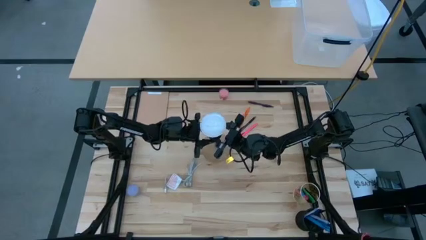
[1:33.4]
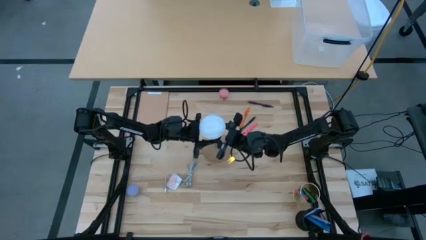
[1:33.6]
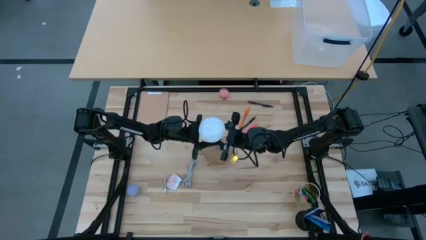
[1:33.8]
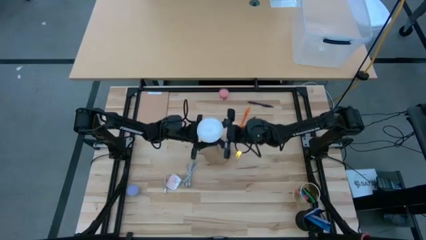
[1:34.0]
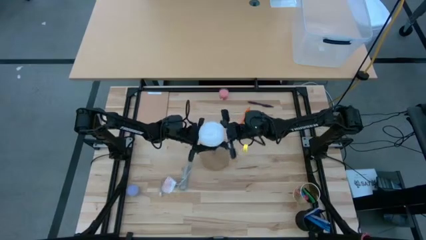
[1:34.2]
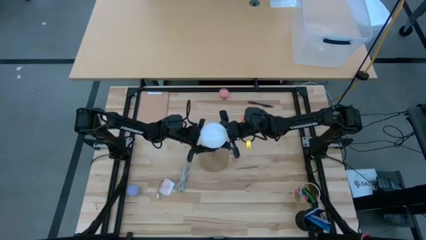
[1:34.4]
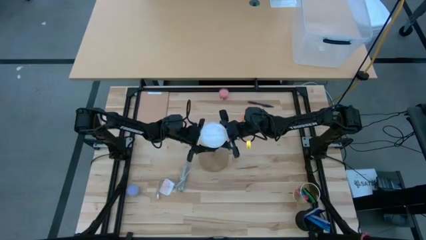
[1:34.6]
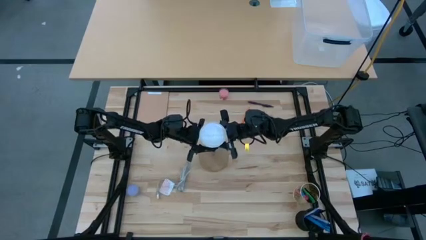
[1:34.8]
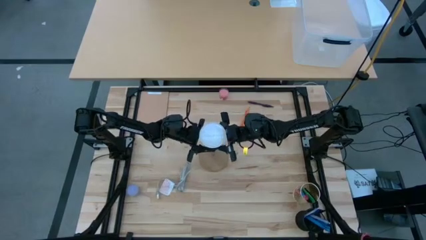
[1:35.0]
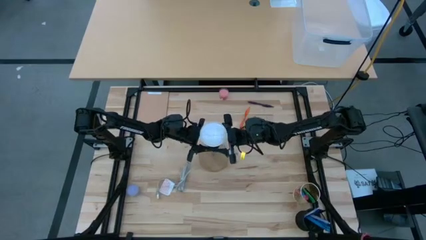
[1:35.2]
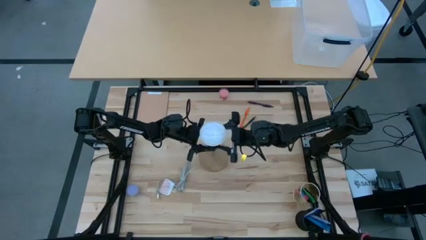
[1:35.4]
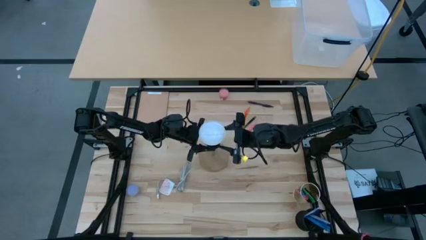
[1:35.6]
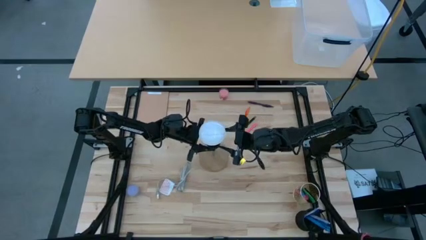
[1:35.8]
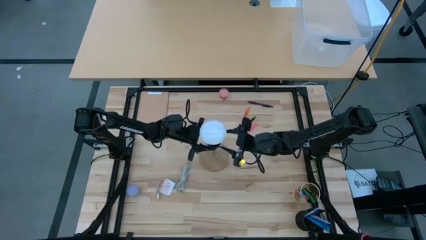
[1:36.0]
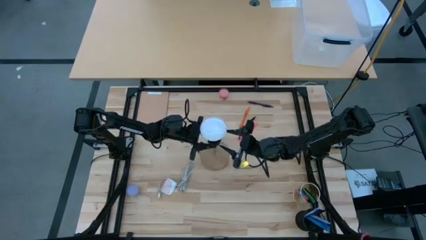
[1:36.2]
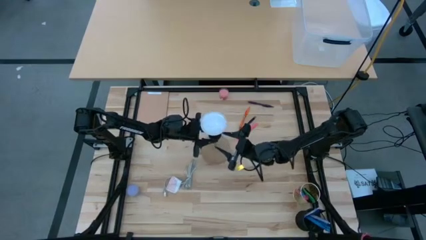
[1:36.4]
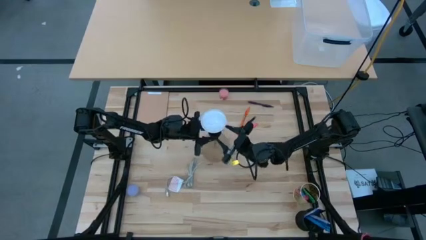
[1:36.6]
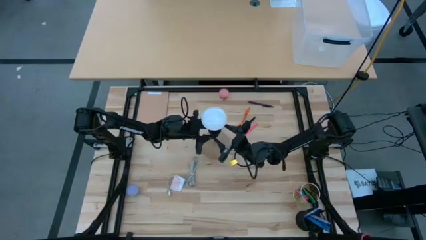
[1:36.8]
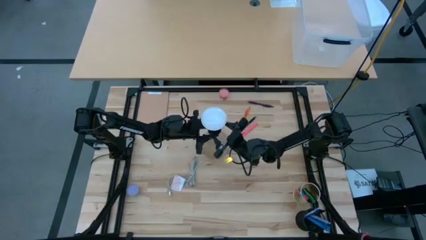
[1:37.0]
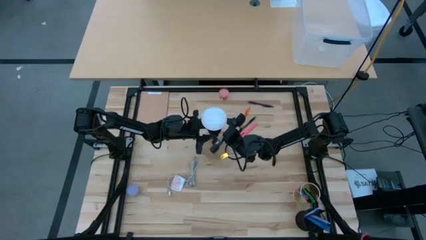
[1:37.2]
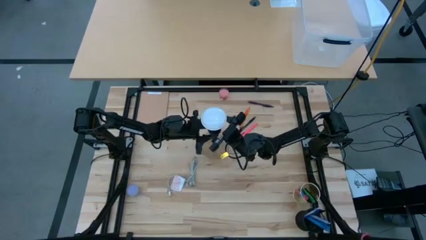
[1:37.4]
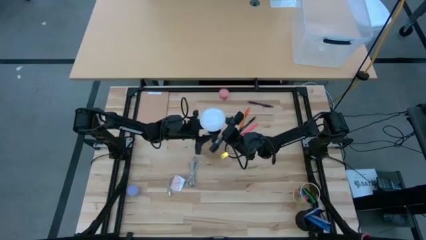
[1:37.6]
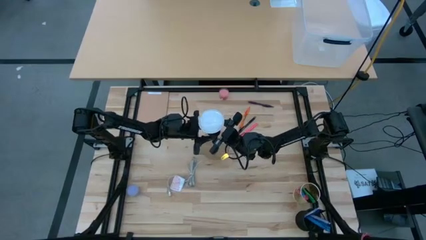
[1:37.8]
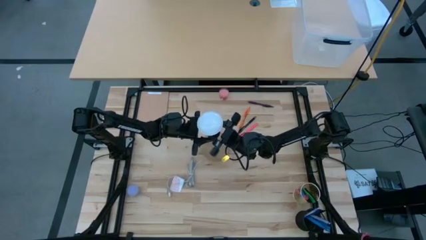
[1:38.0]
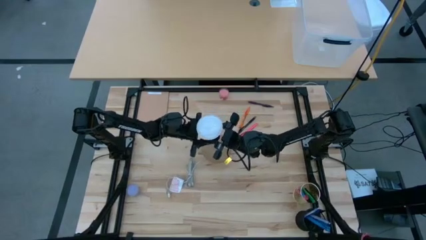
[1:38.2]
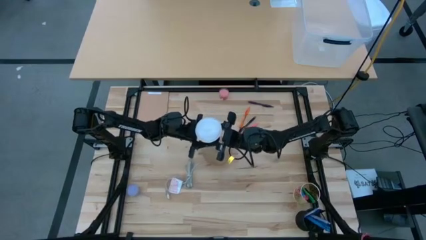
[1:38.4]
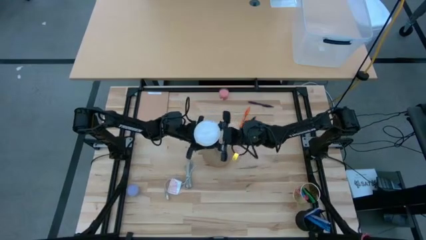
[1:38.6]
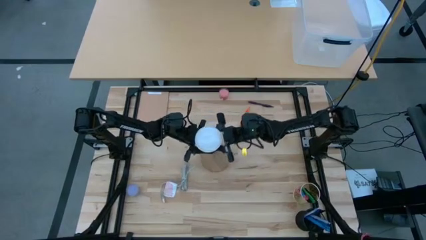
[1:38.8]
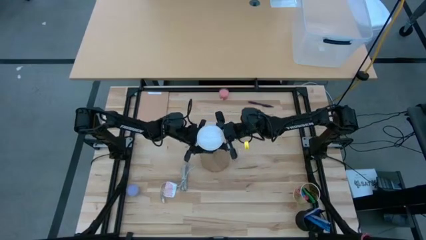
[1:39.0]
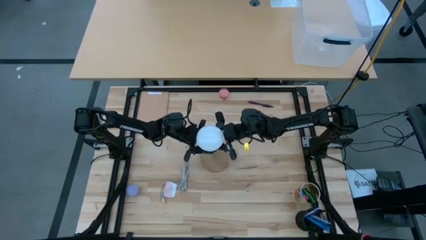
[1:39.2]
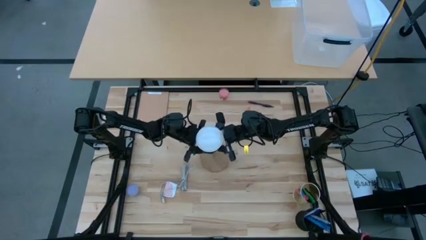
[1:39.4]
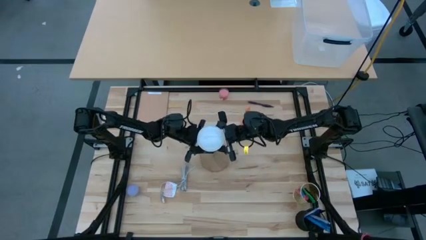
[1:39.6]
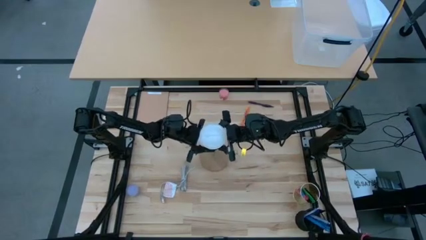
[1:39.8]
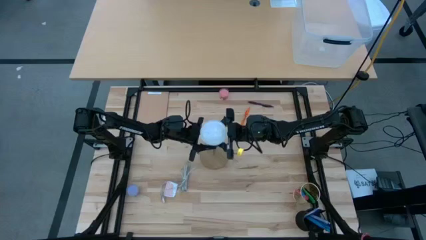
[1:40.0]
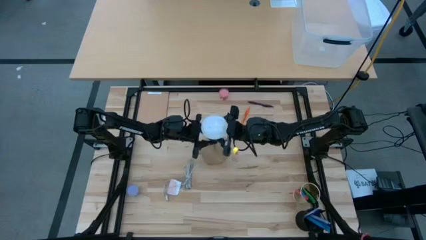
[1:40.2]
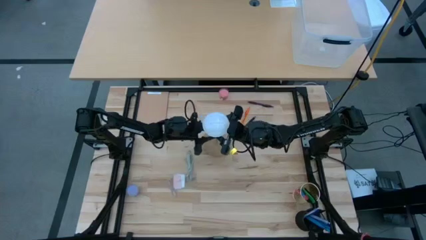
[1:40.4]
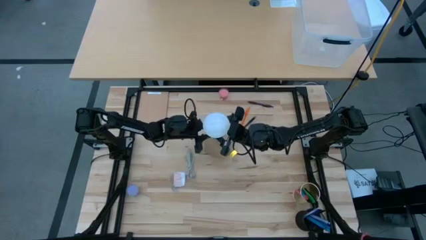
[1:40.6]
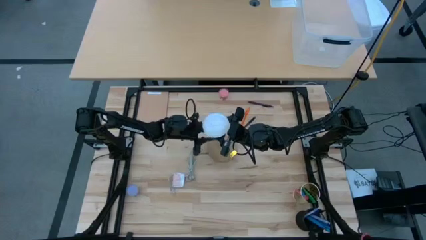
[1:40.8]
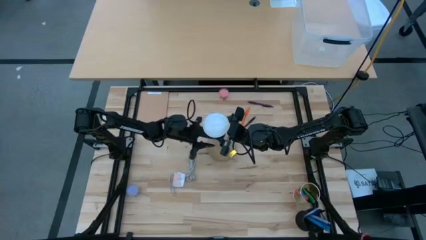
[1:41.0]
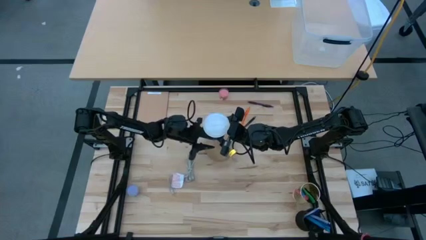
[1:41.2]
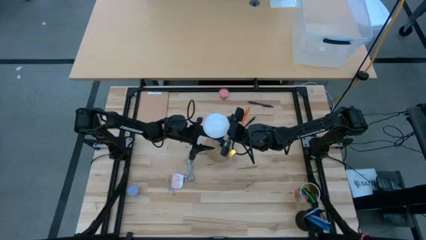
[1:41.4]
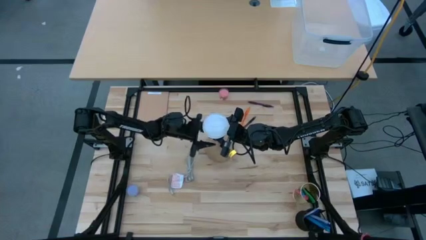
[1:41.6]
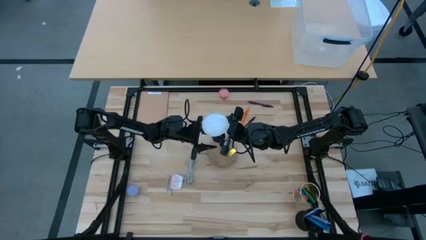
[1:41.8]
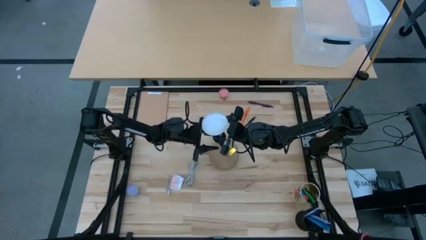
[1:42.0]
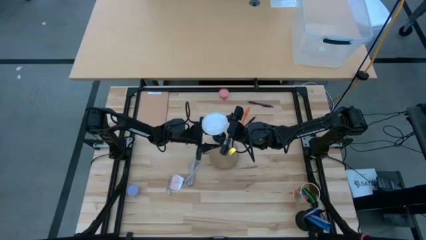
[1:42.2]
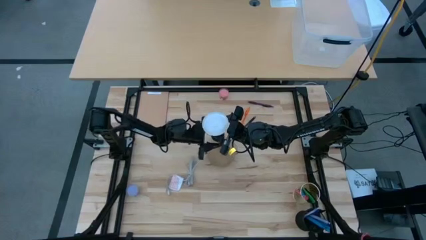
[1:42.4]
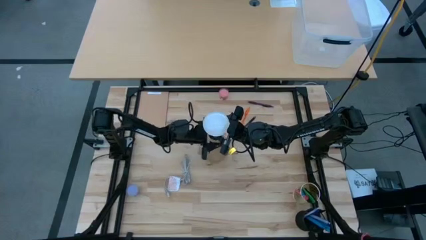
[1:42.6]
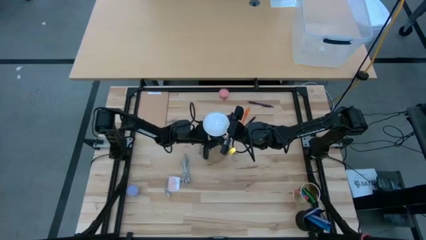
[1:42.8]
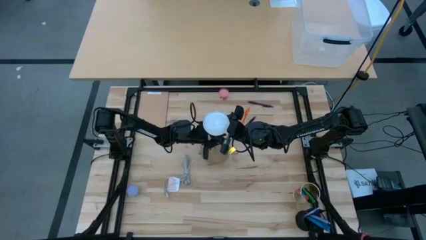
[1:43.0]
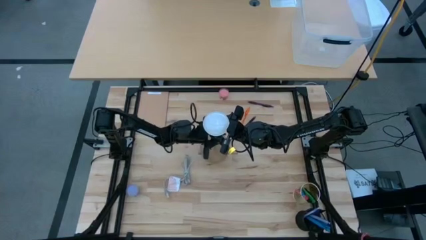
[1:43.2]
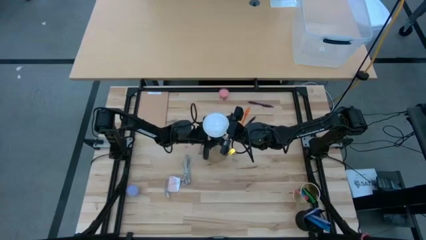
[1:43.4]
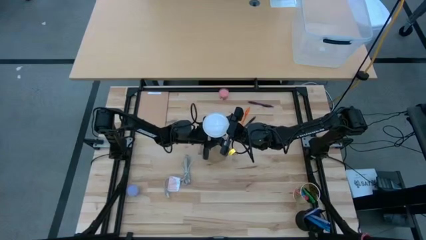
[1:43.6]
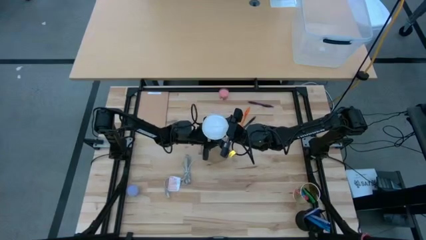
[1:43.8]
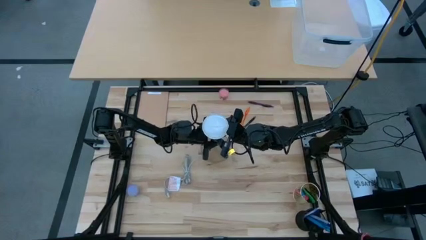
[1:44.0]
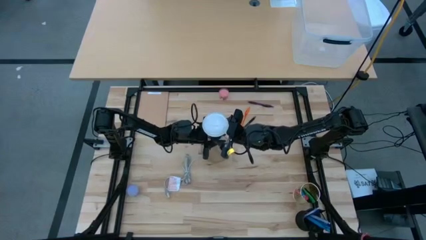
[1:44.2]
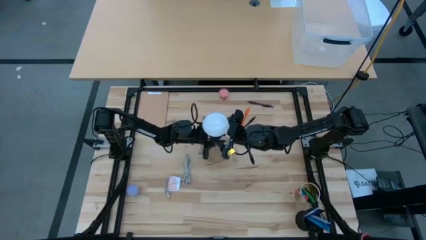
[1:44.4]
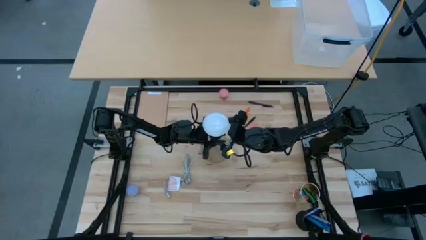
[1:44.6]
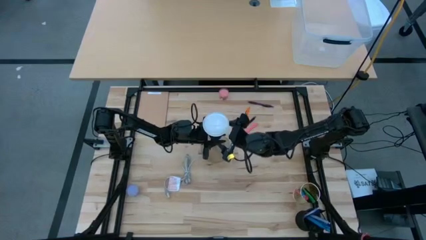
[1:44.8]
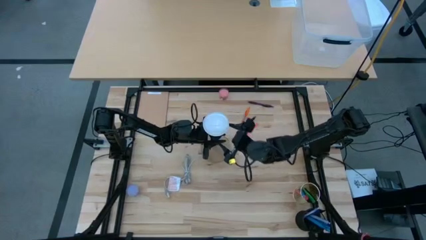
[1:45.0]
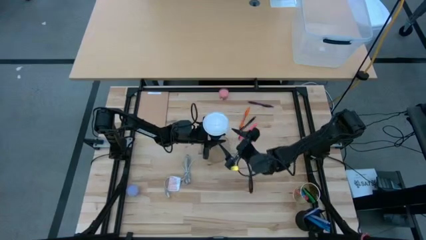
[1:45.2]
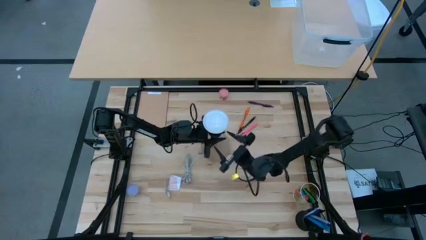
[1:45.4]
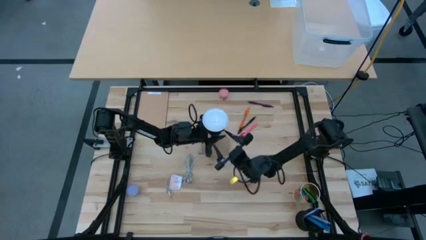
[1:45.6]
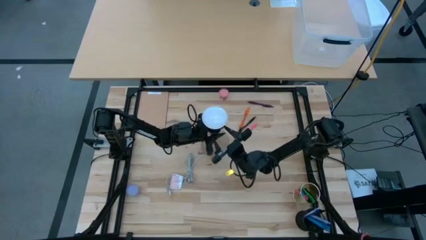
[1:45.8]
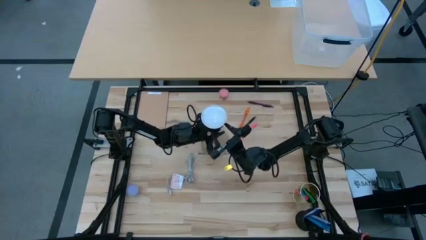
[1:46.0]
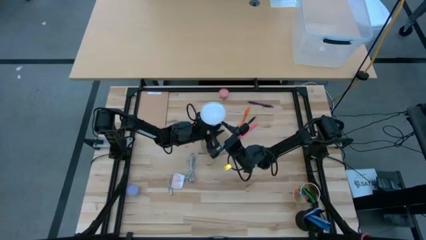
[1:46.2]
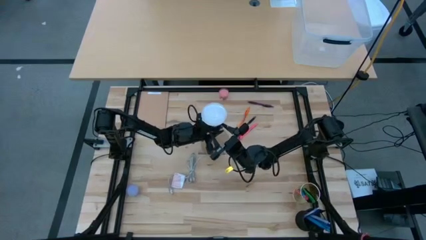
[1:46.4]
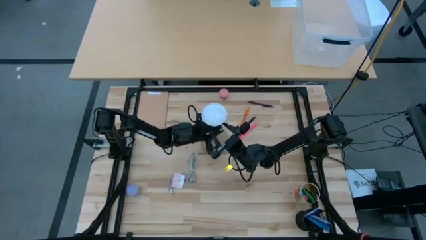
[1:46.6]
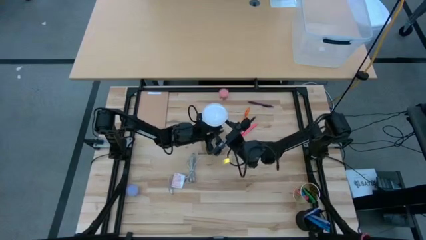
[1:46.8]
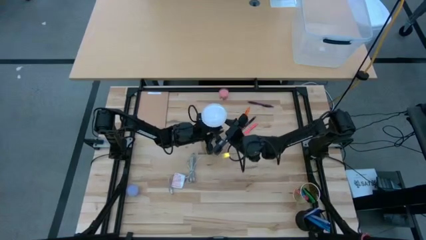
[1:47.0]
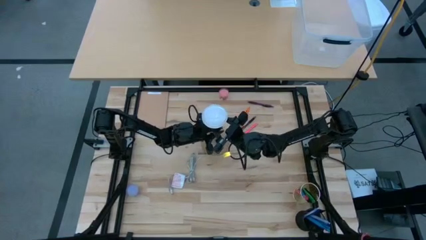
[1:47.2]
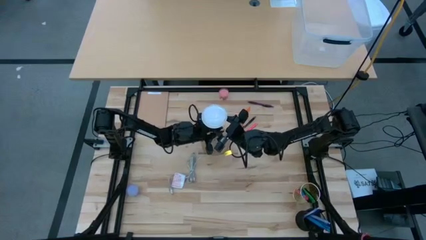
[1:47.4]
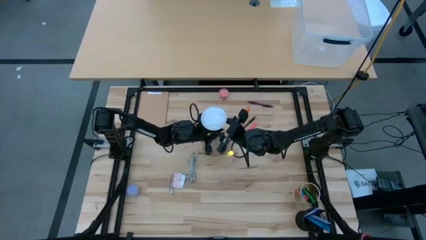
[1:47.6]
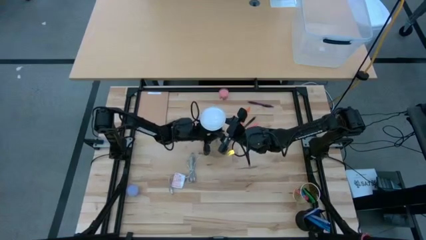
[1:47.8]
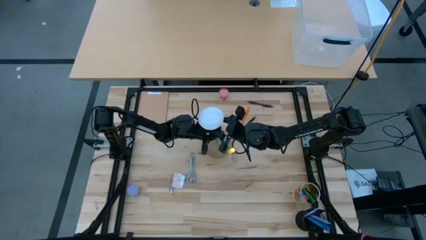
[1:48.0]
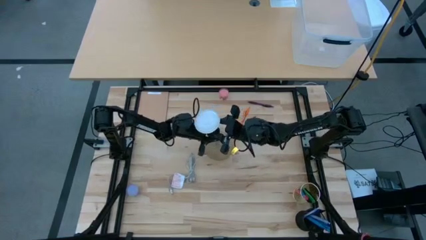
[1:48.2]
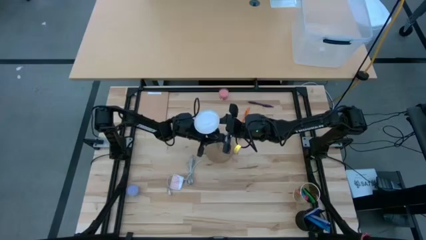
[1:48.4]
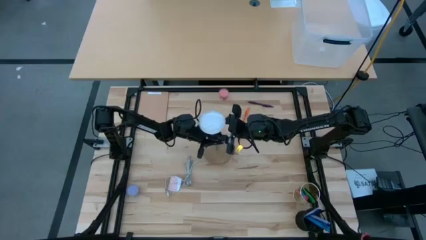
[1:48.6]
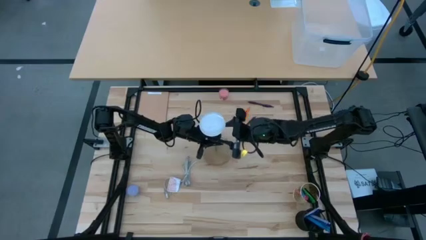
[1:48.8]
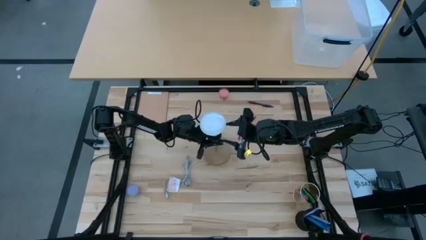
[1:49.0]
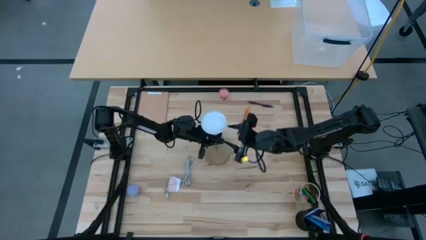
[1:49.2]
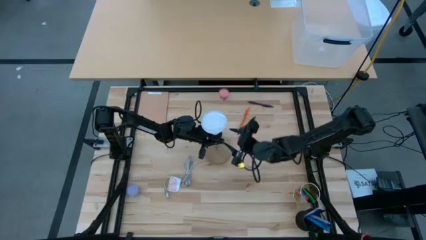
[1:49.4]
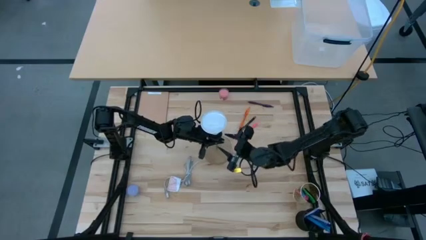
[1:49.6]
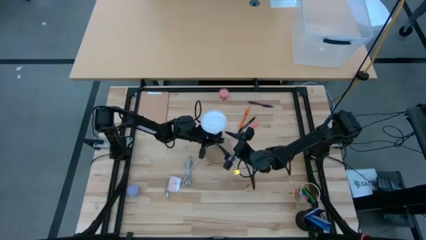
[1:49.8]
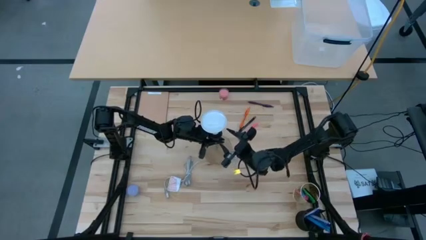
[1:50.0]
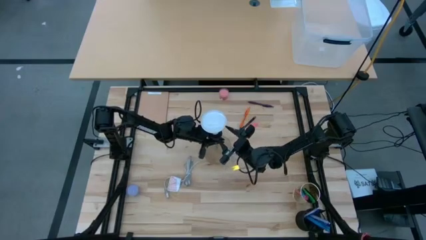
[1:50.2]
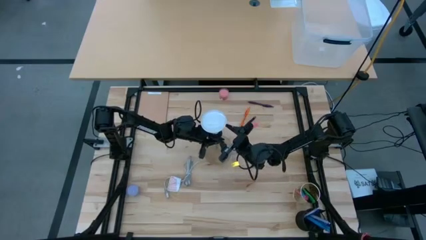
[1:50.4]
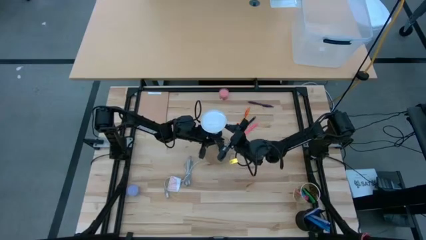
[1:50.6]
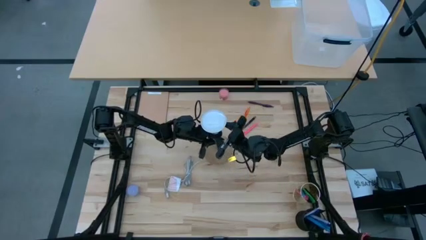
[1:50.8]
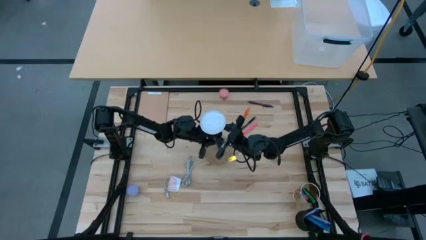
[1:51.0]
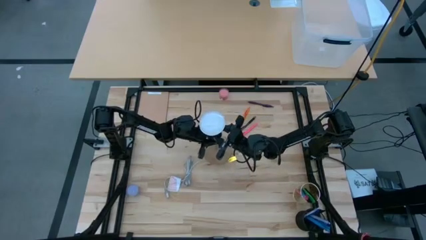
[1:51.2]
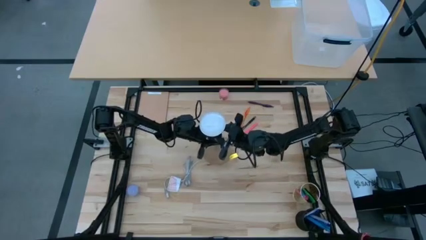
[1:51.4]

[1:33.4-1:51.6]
Task: Screw lightbulb
Remove the white lightbulb from the desk lamp
